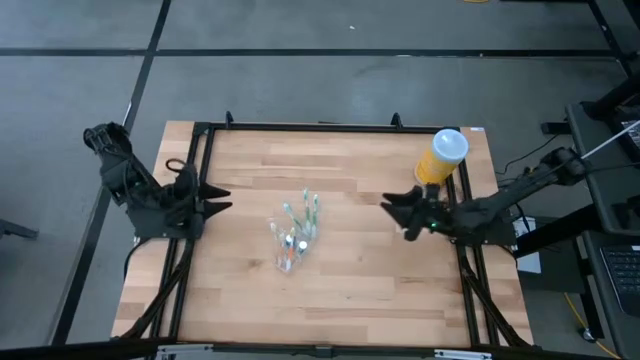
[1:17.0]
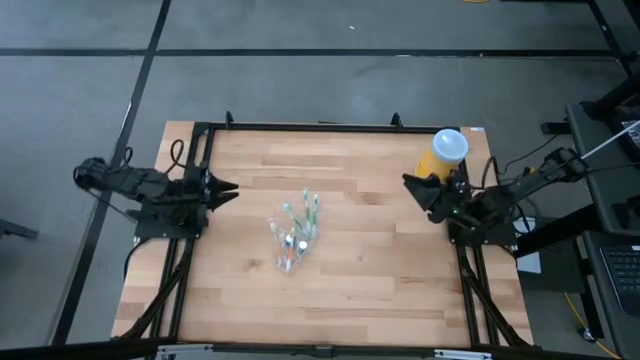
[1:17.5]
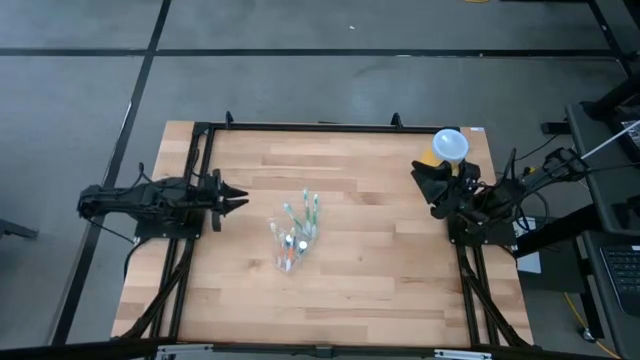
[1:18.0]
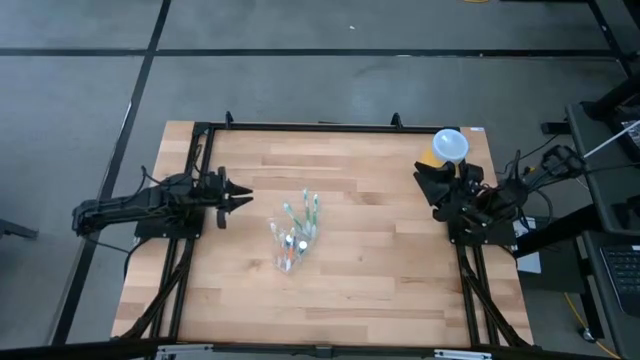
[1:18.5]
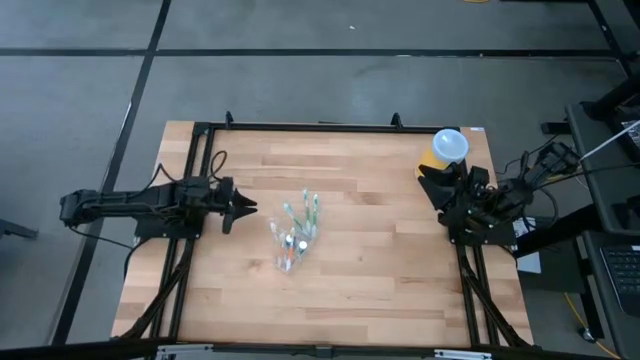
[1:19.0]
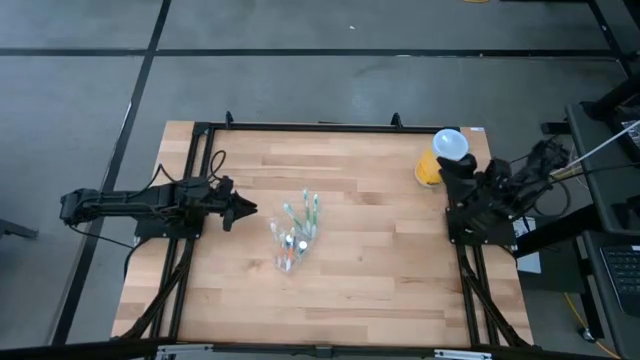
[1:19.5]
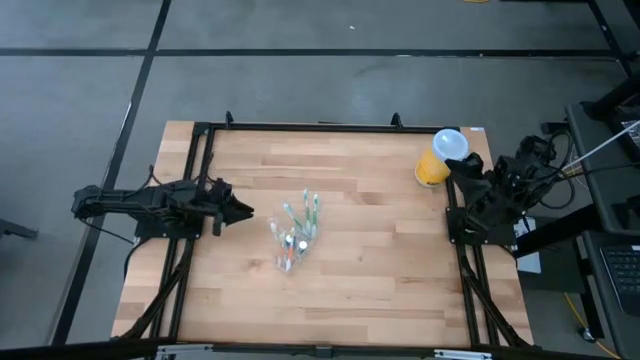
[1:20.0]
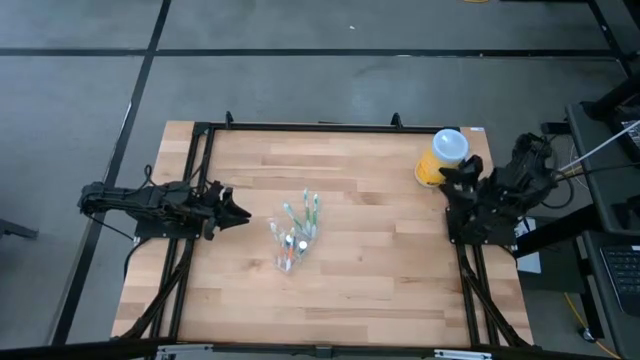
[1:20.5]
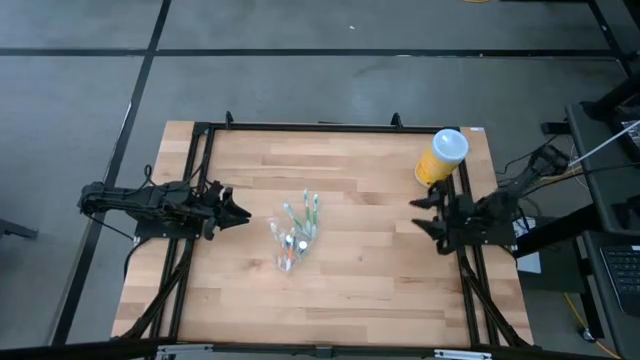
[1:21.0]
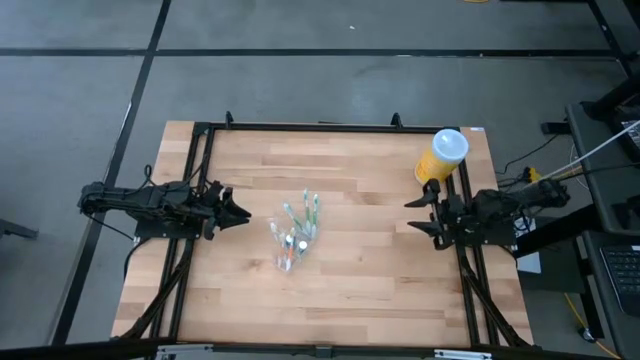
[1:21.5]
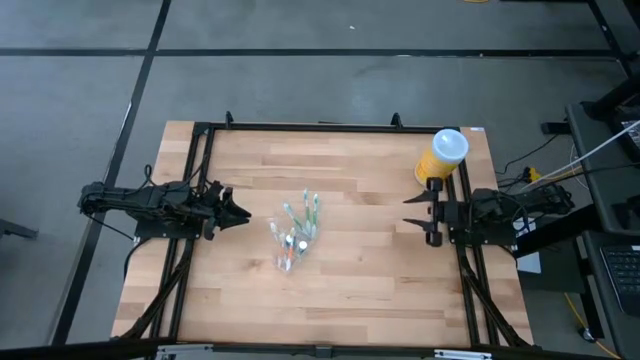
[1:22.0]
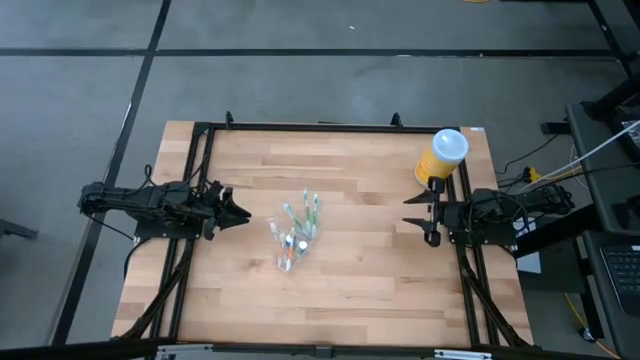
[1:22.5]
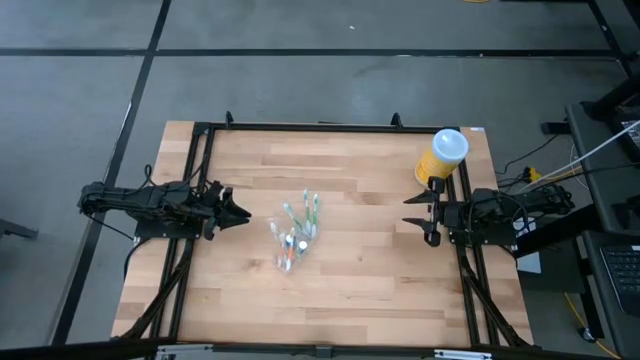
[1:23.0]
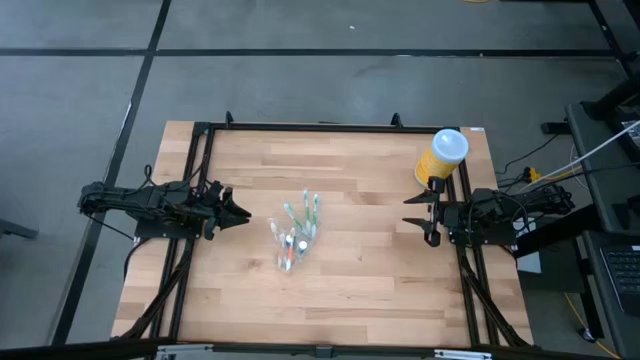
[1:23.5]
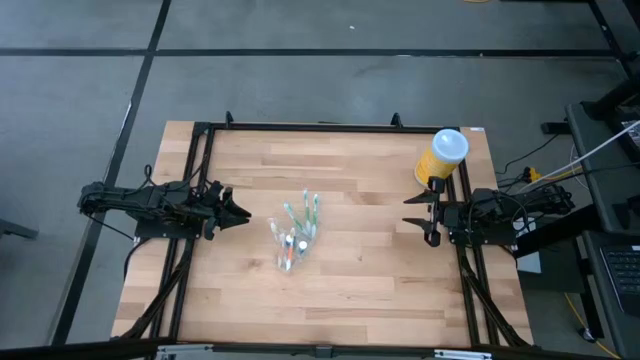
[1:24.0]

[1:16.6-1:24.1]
Task: Pick & Place toothbrushing station
Return To Home Position

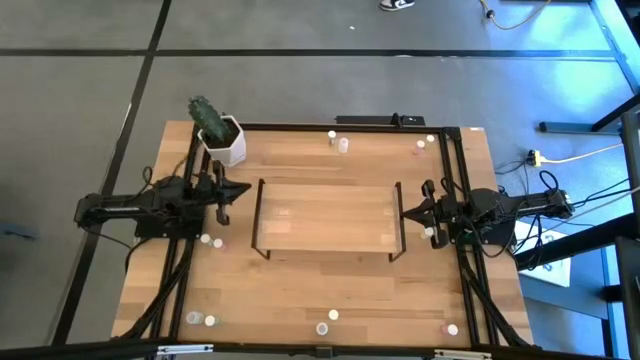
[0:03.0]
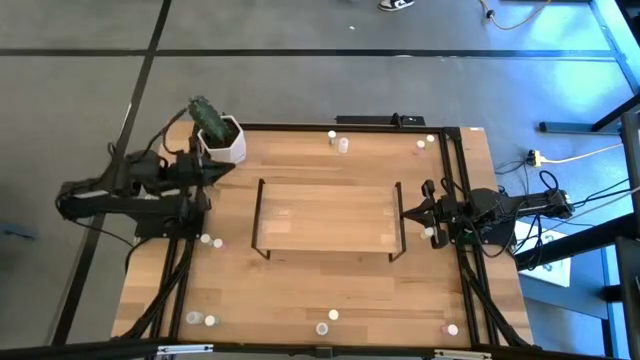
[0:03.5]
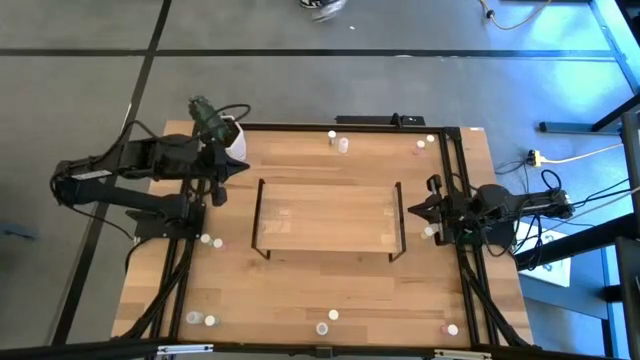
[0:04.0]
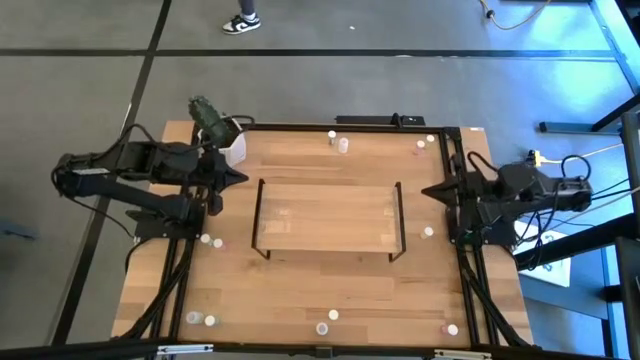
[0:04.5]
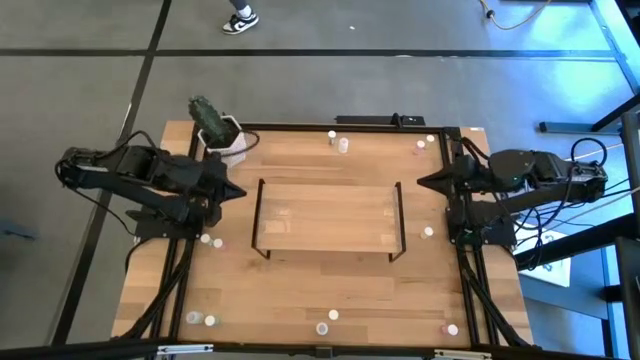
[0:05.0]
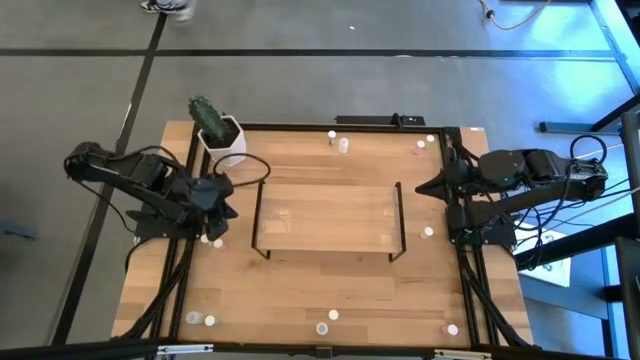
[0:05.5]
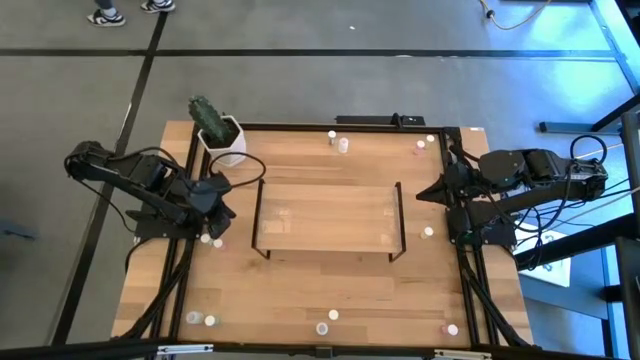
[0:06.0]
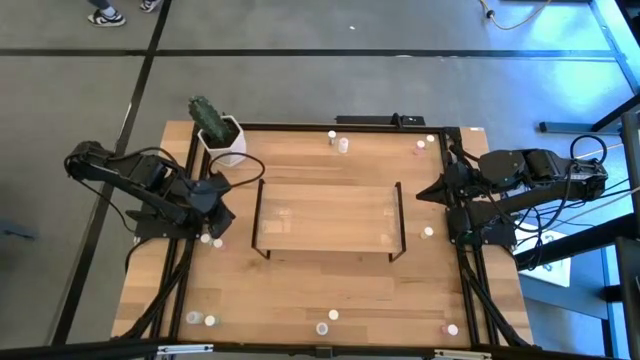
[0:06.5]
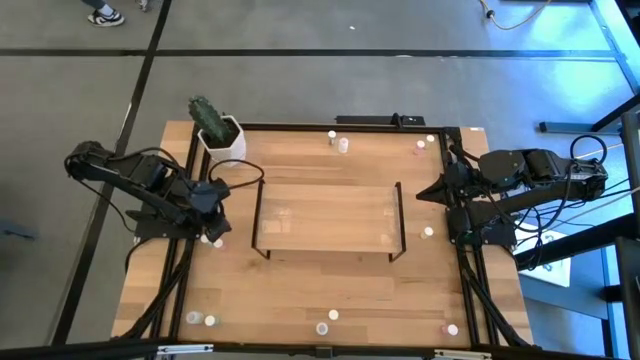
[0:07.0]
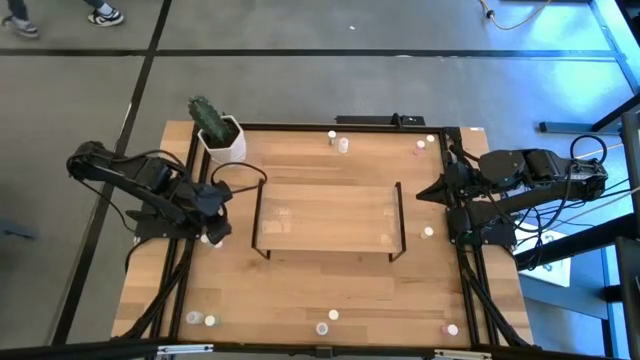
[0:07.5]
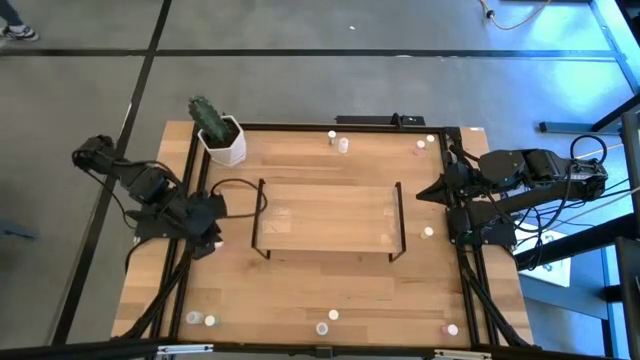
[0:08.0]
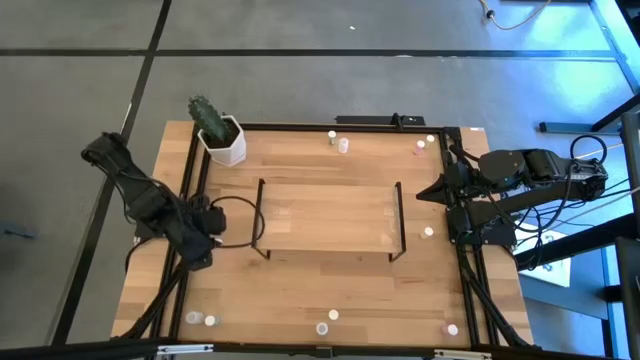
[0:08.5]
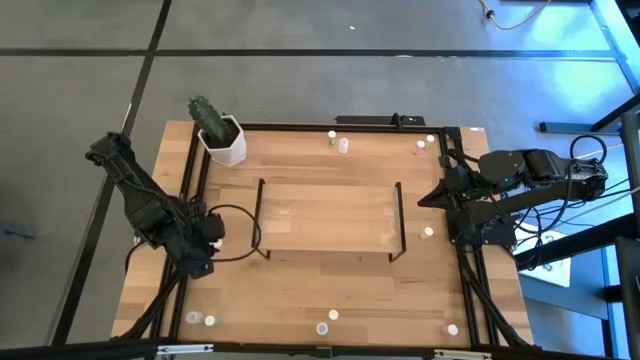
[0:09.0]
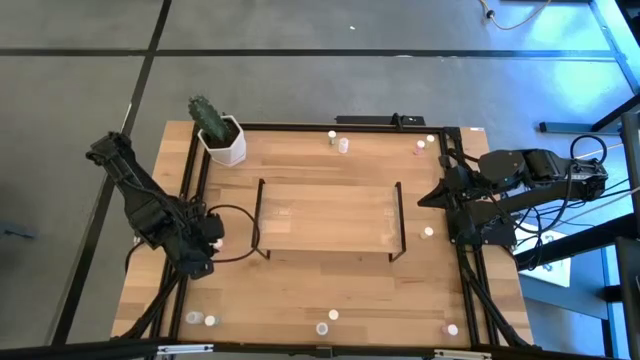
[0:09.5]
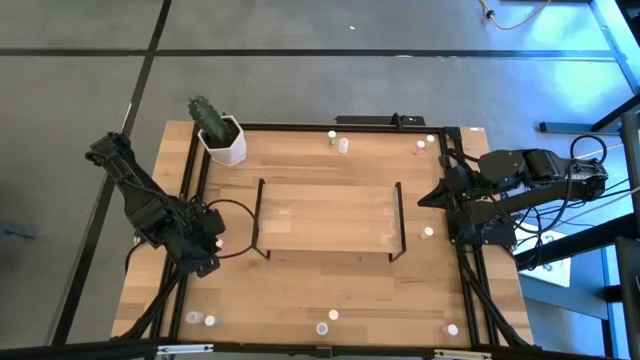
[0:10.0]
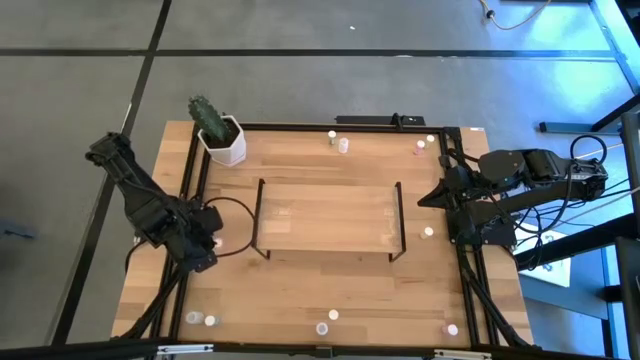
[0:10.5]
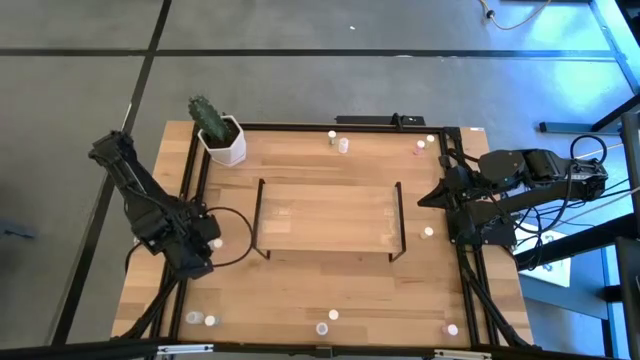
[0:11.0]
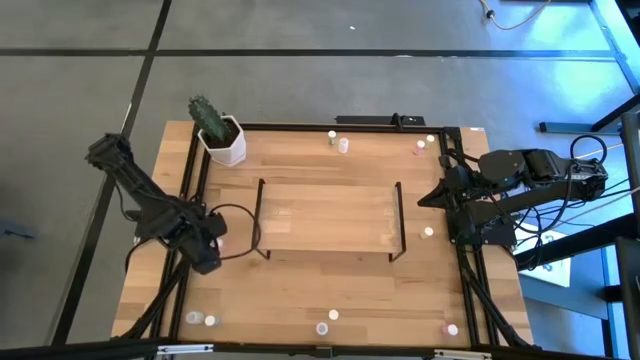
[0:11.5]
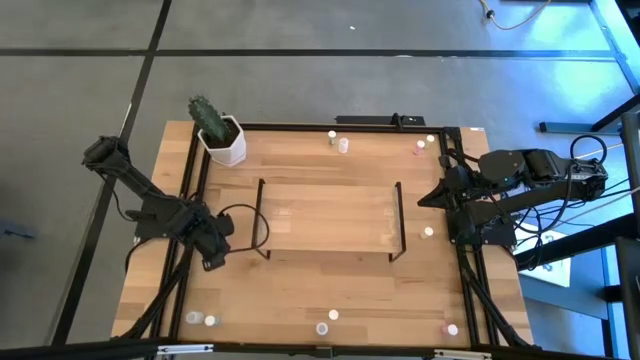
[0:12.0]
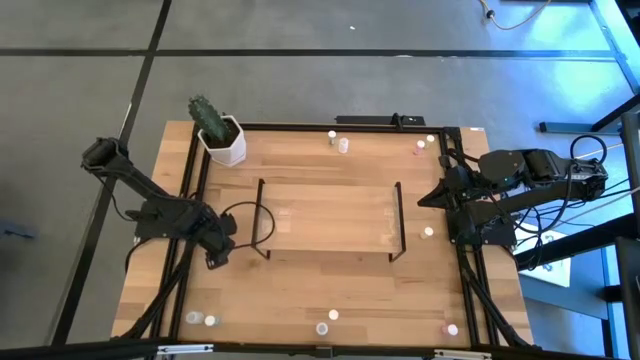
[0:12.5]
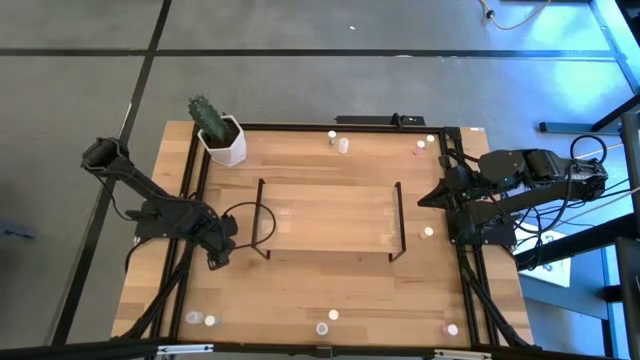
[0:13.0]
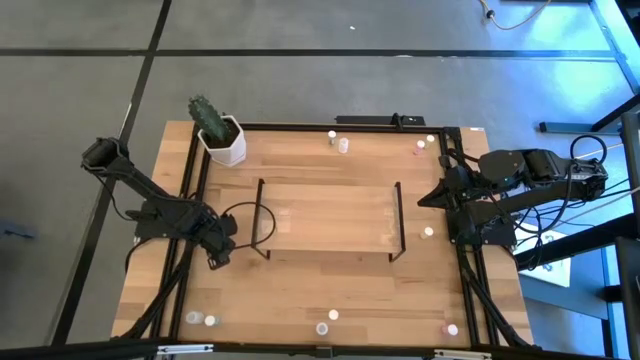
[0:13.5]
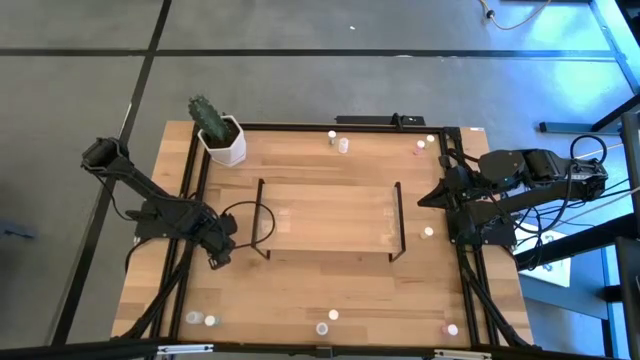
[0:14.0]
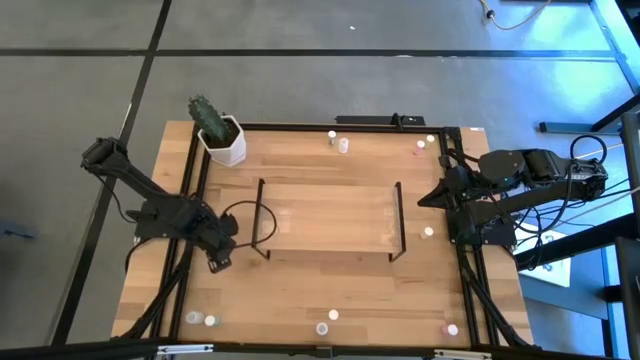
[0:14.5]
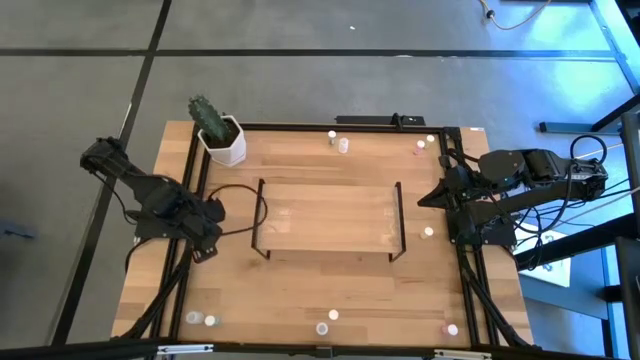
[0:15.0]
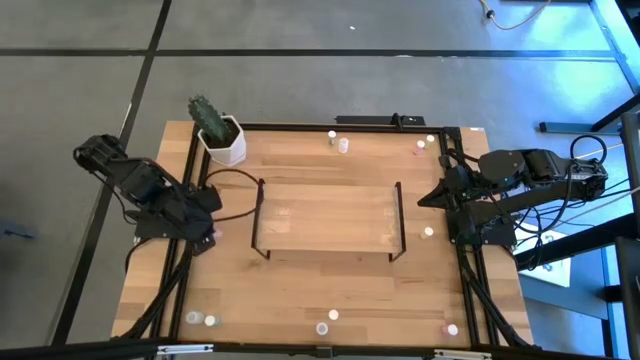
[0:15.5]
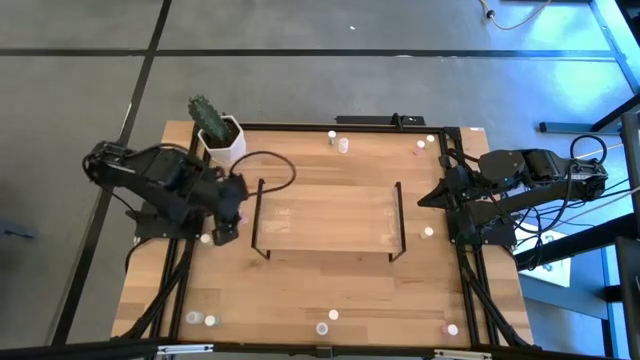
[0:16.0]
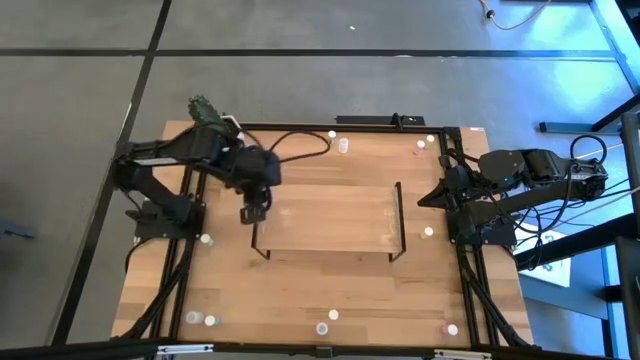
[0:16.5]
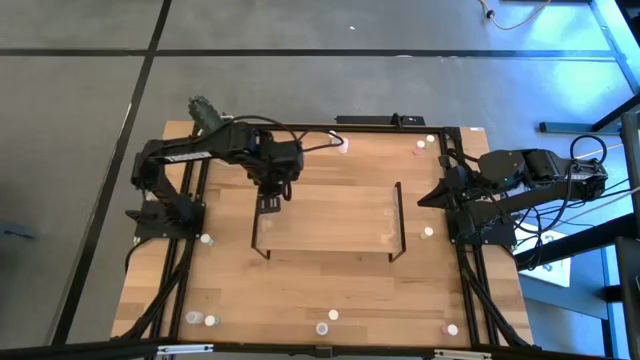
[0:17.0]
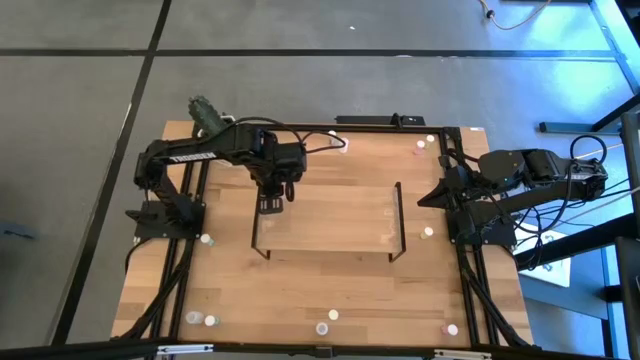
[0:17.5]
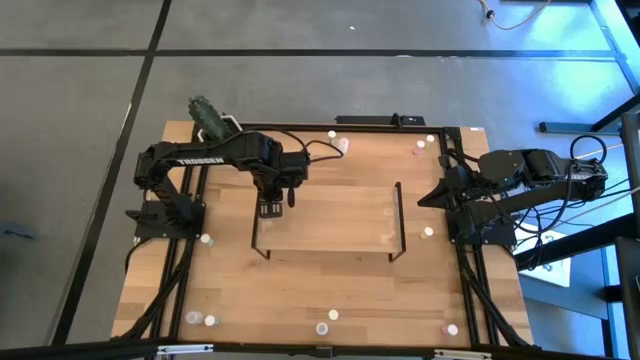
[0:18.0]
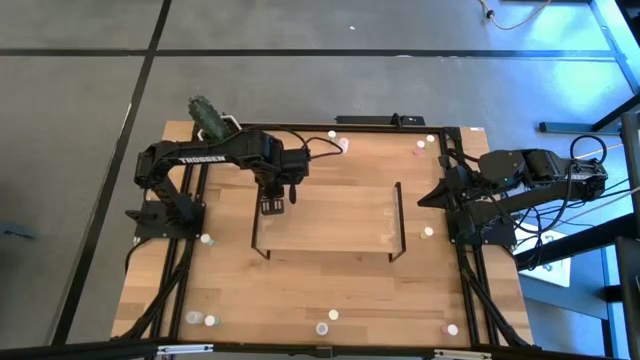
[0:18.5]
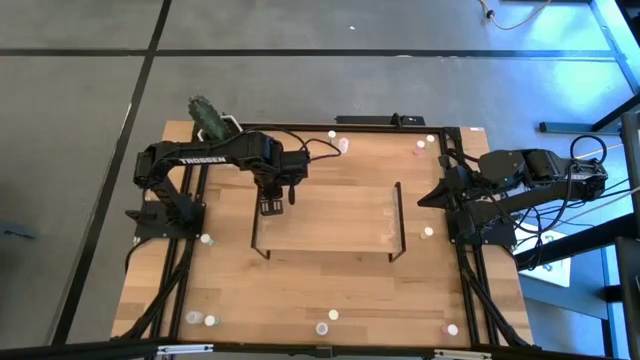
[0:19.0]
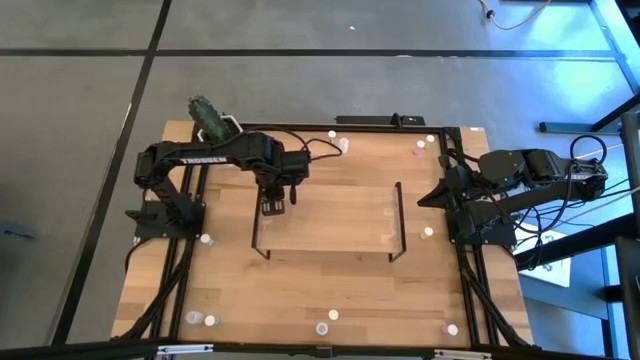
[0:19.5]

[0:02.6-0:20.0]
Task: Pick and place medicine bottles onto shelf by color
Put the left pink pill bottle on the shelf
